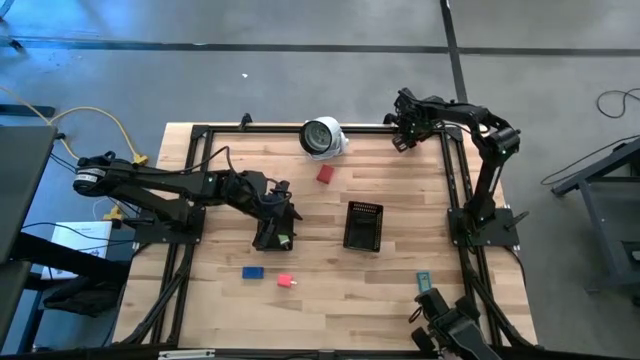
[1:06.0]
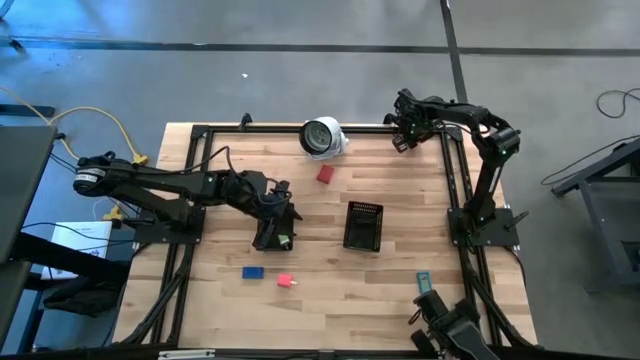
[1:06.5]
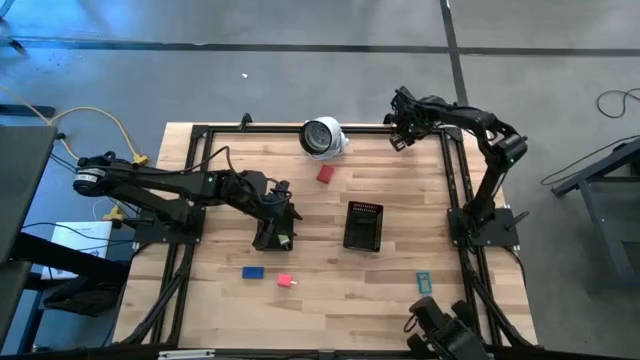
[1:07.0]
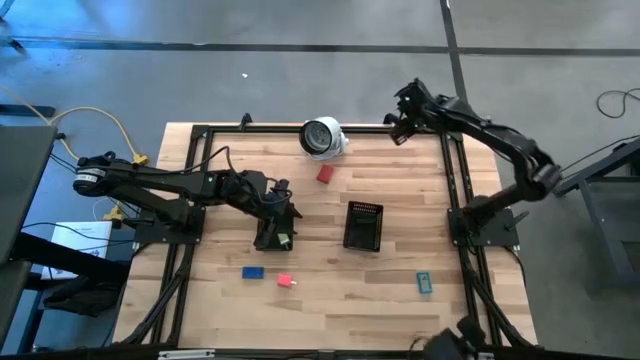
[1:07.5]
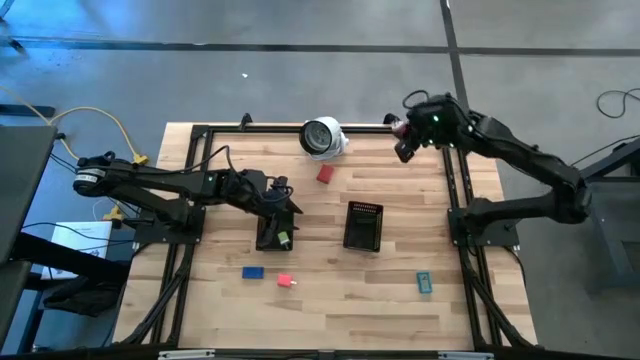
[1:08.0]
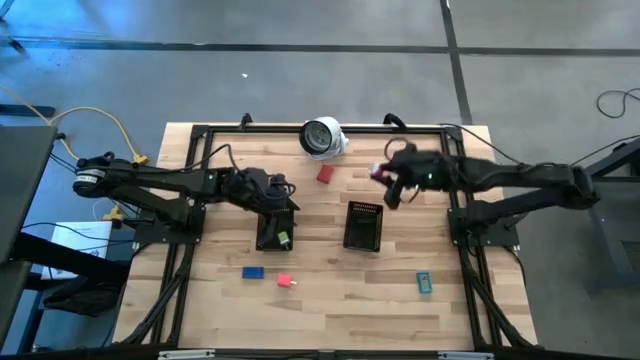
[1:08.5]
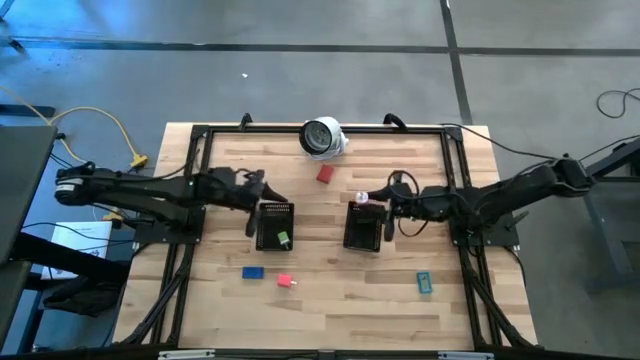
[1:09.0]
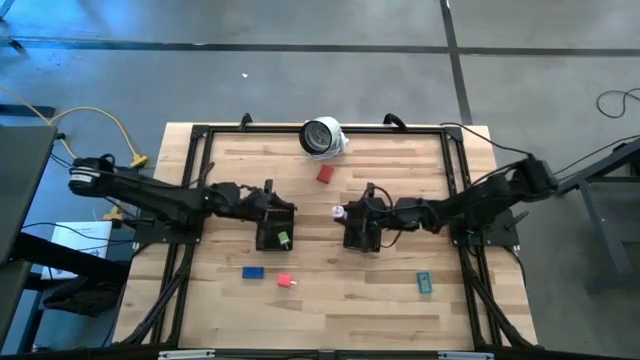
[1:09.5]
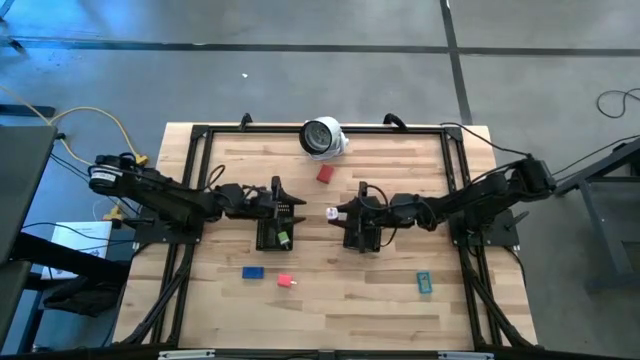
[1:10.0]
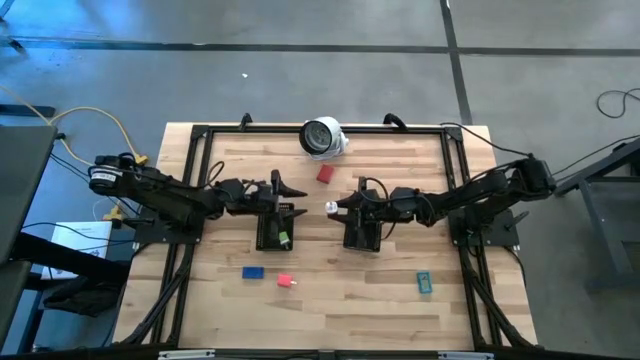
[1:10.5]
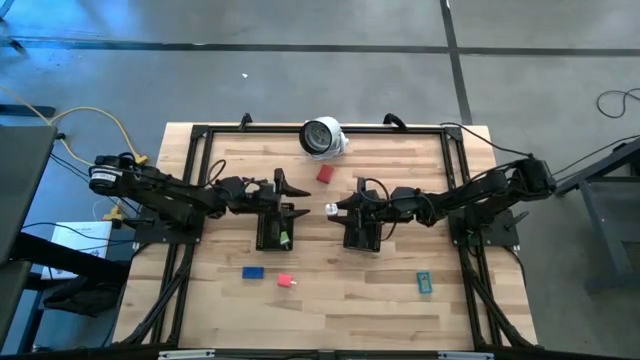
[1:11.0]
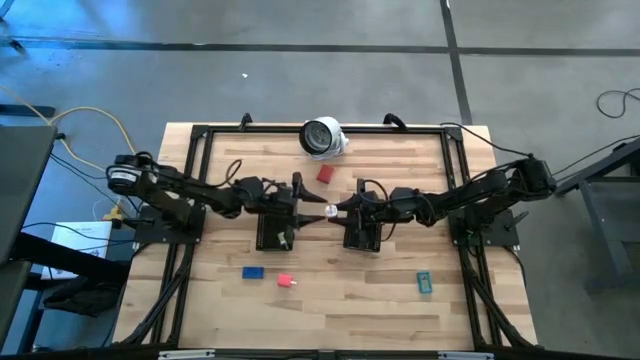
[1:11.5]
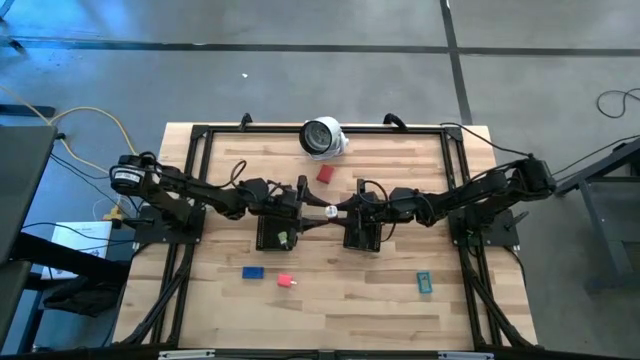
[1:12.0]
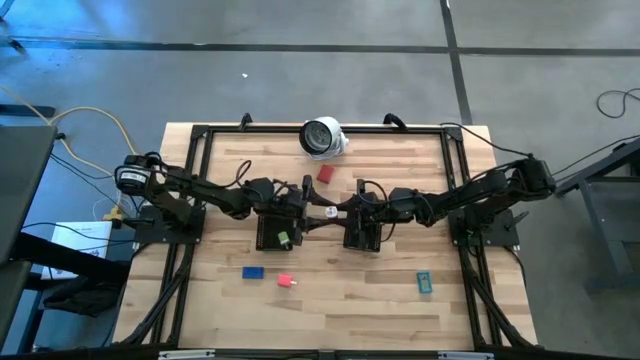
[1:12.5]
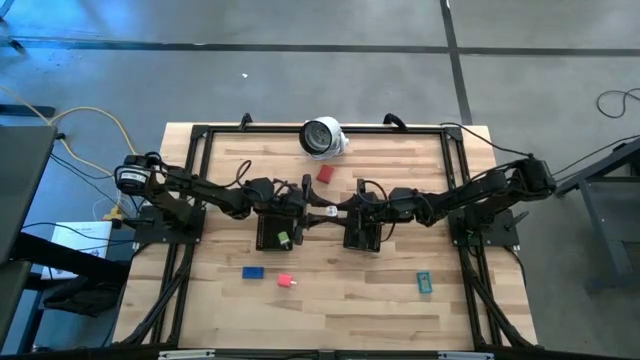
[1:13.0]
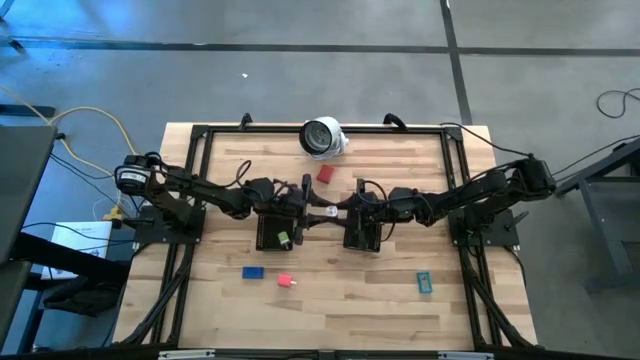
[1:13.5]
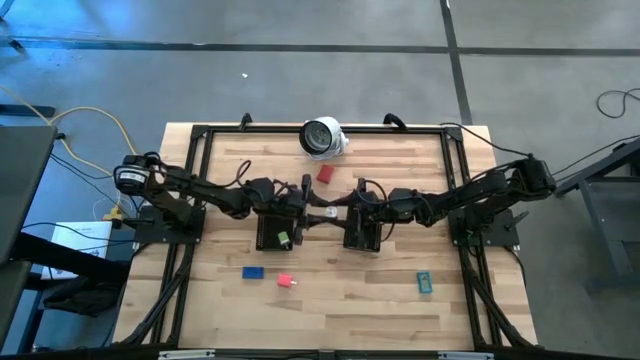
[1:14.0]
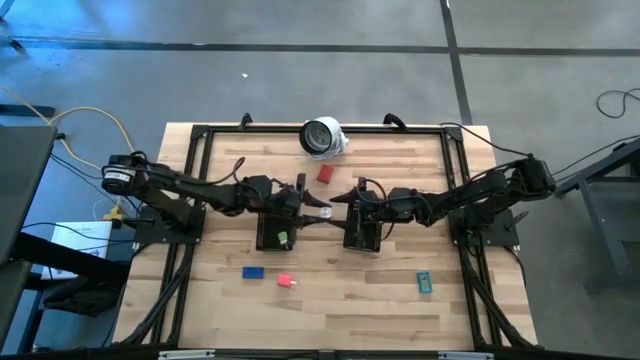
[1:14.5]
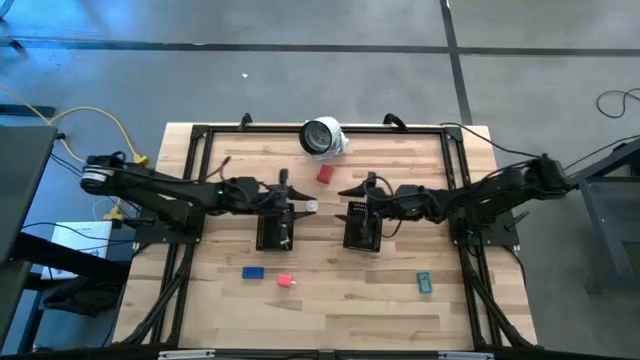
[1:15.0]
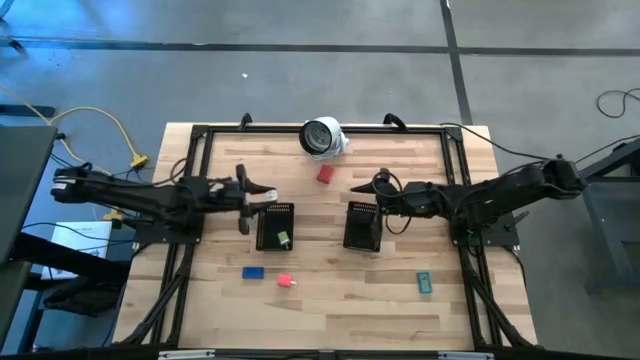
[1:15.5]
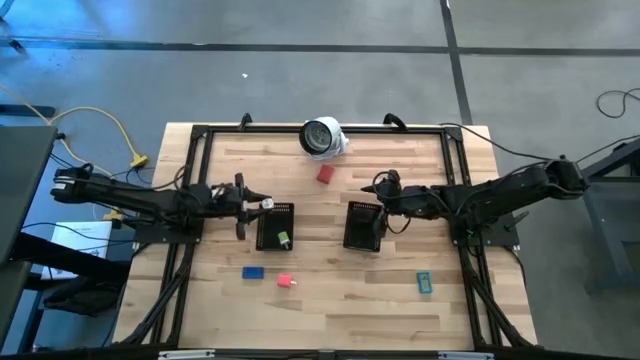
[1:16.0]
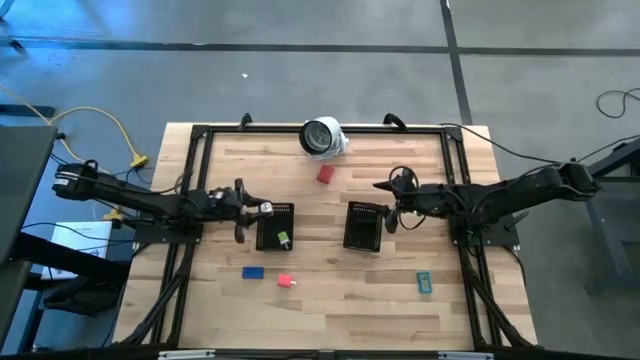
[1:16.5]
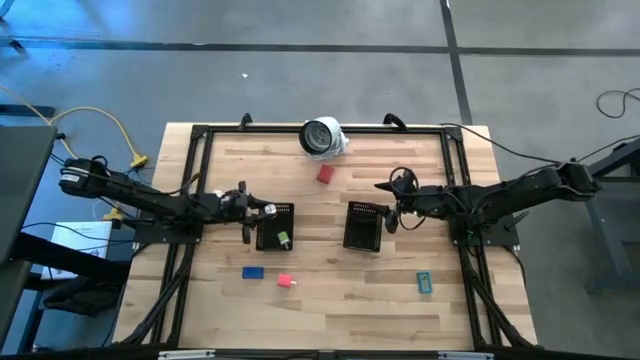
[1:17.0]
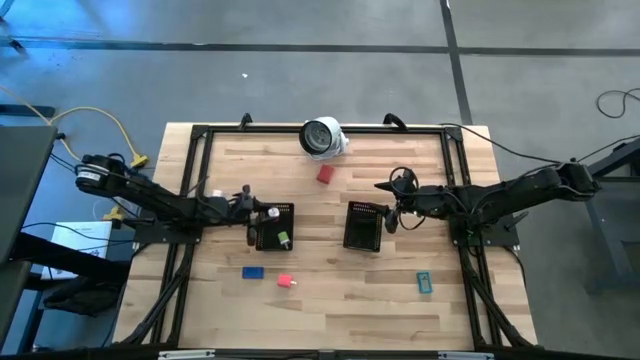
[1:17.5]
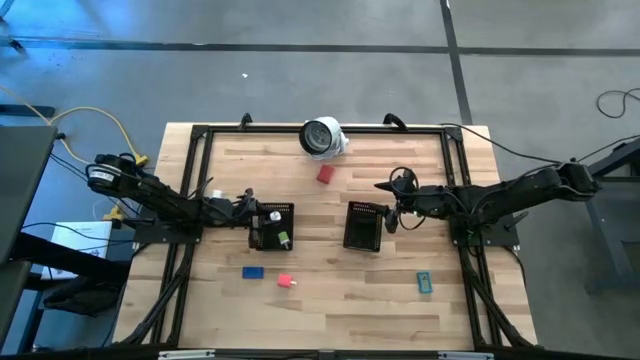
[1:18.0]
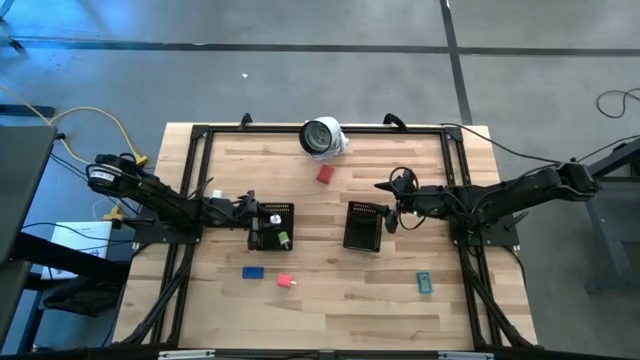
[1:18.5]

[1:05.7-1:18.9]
Task: Pick & Place Office items
Put the pink white charger adapter into the left black bin

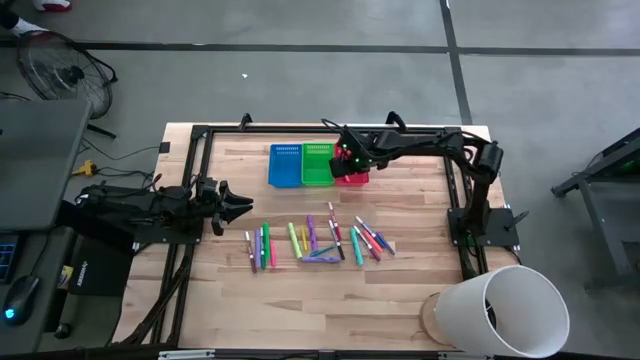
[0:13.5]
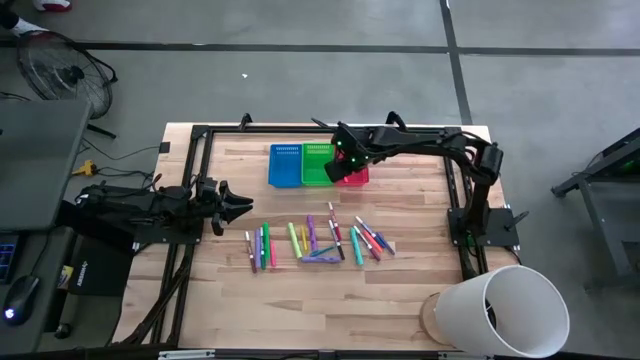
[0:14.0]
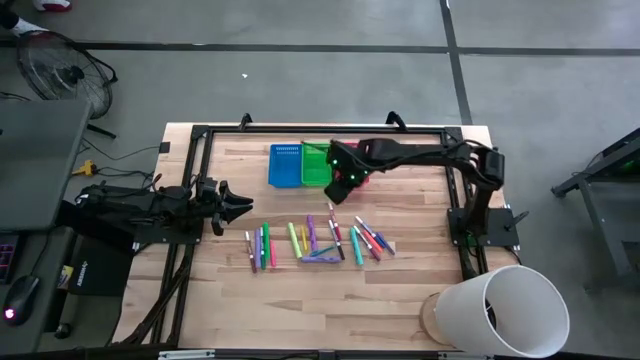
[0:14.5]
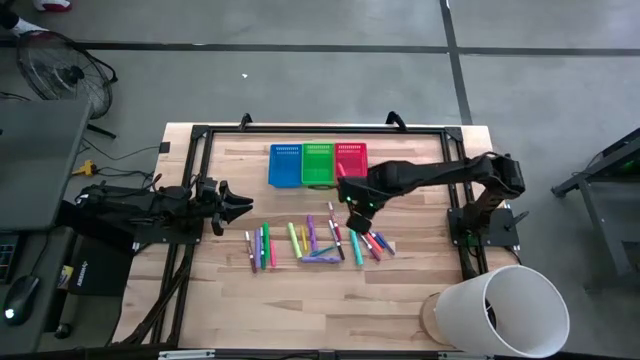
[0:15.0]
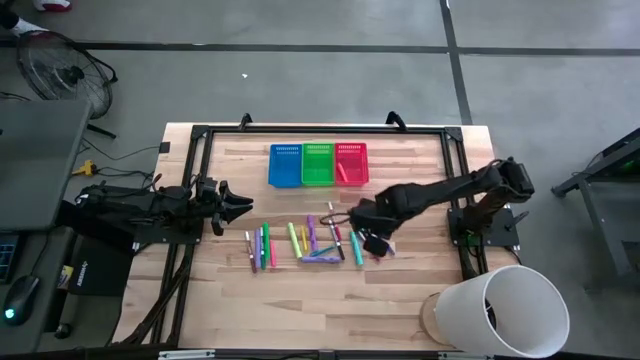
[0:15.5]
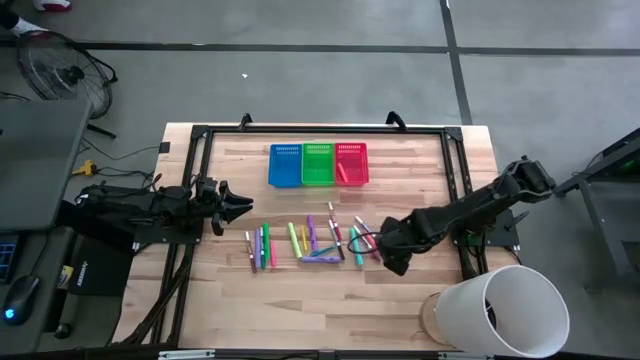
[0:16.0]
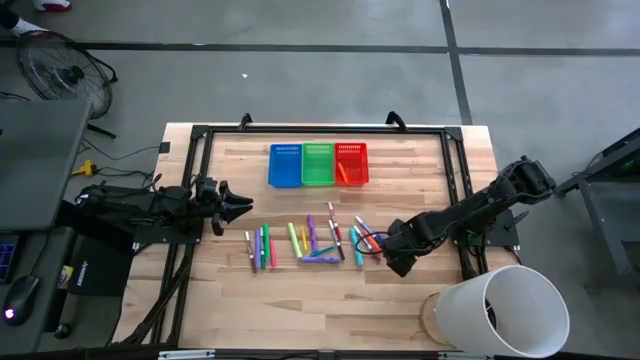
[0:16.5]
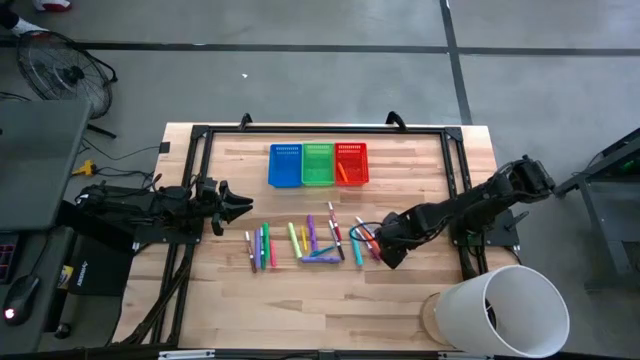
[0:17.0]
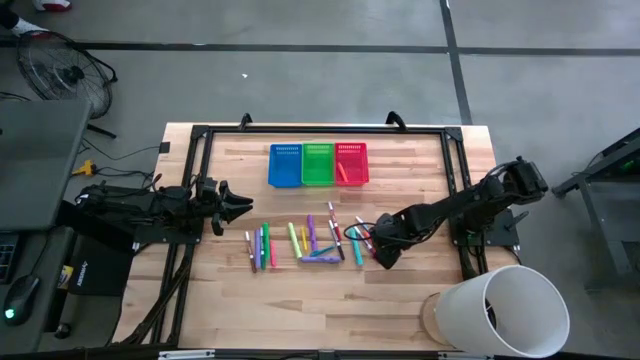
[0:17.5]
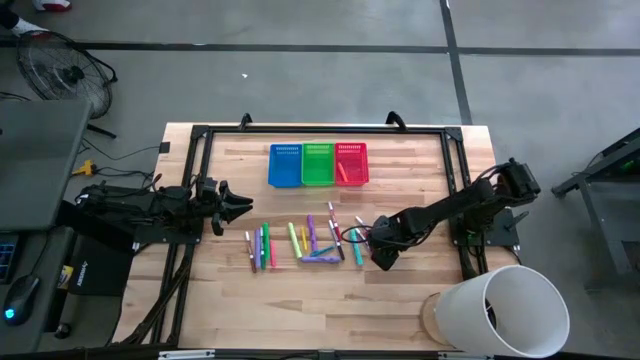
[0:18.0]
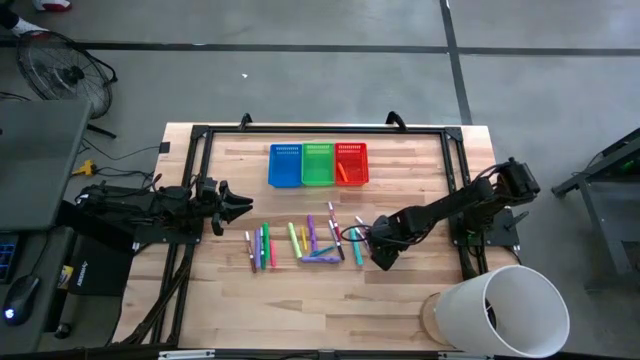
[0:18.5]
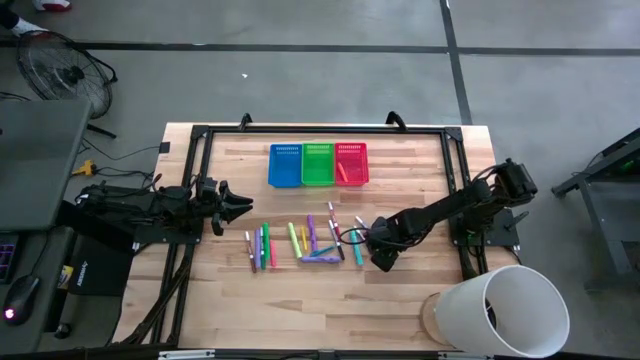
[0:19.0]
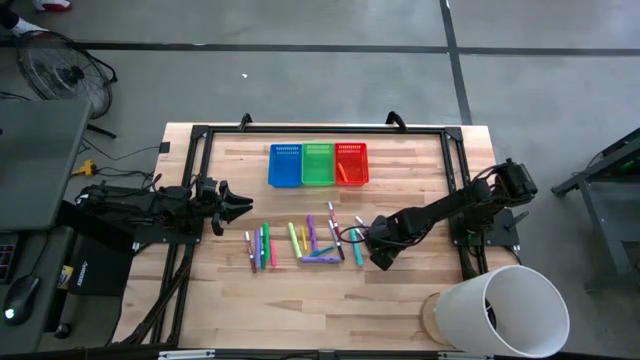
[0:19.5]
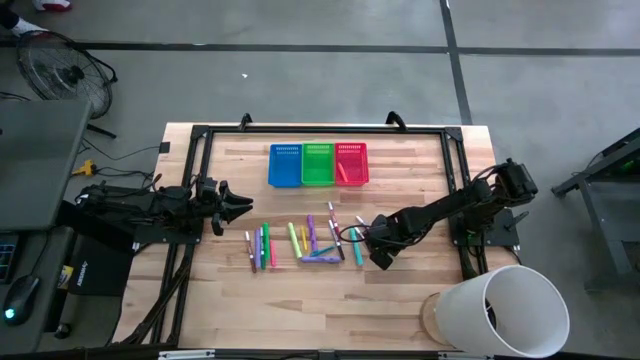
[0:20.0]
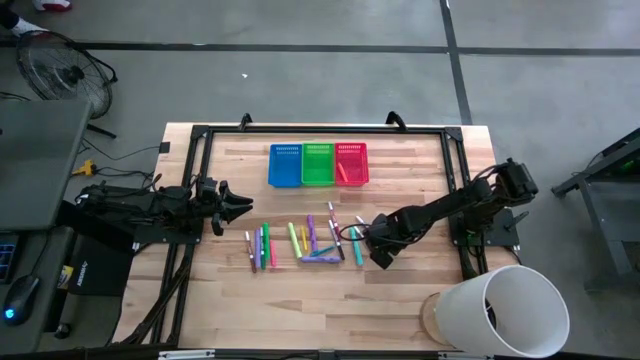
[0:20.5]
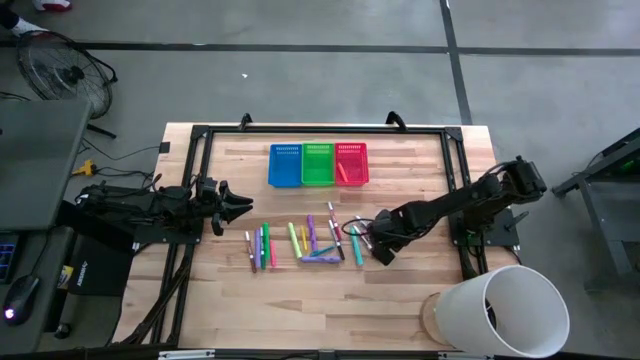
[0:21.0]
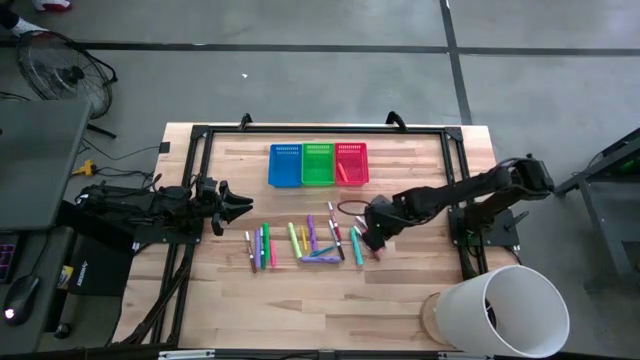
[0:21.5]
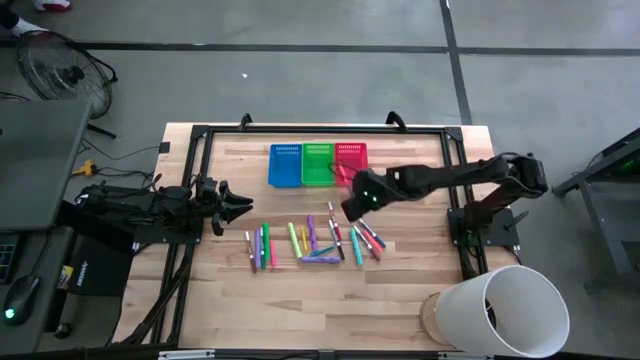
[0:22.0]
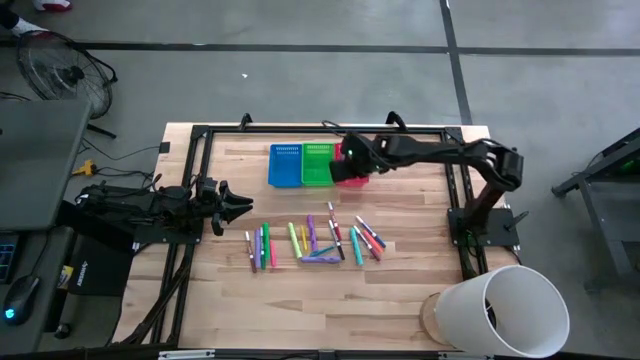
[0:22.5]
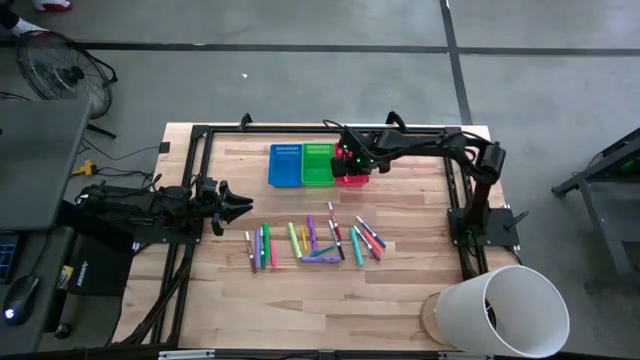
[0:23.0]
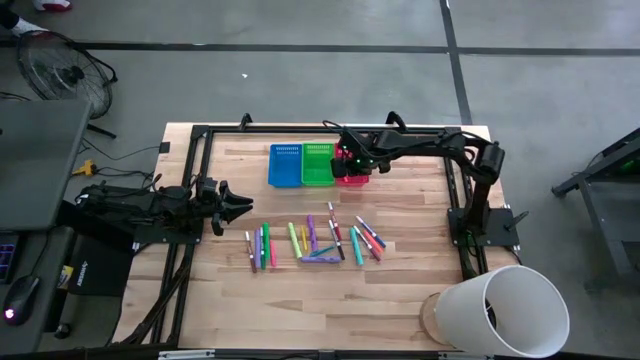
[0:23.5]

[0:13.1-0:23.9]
Task: Pick & Place Markers
Put the blue highlighter pen into the red bin
